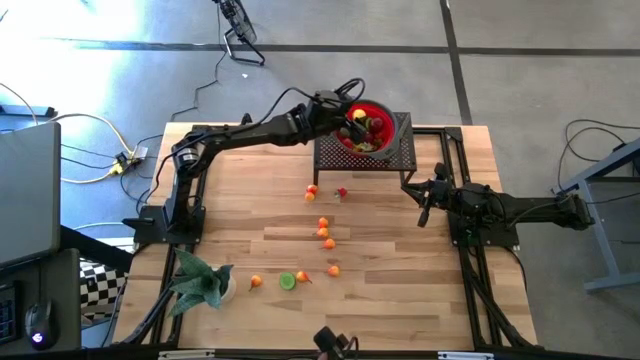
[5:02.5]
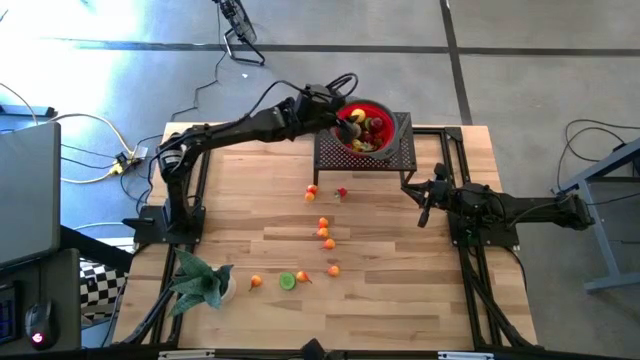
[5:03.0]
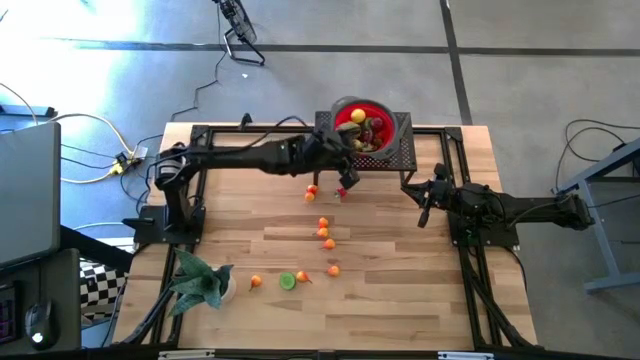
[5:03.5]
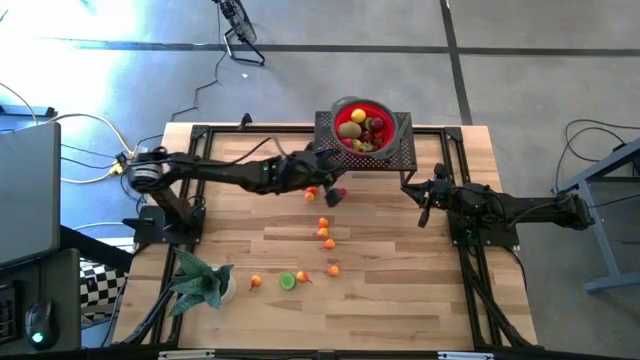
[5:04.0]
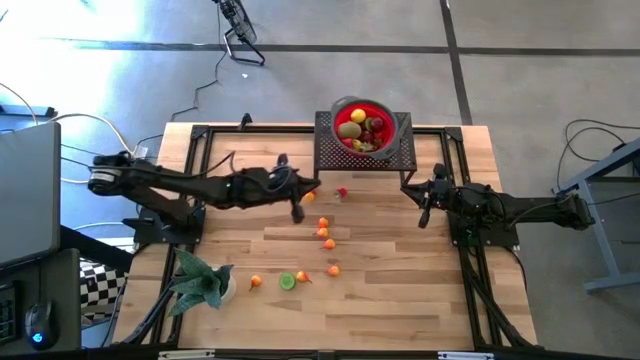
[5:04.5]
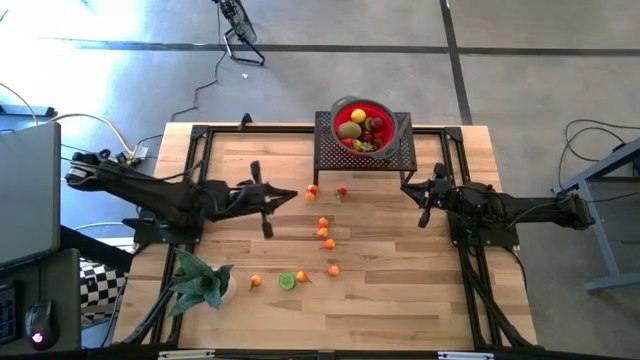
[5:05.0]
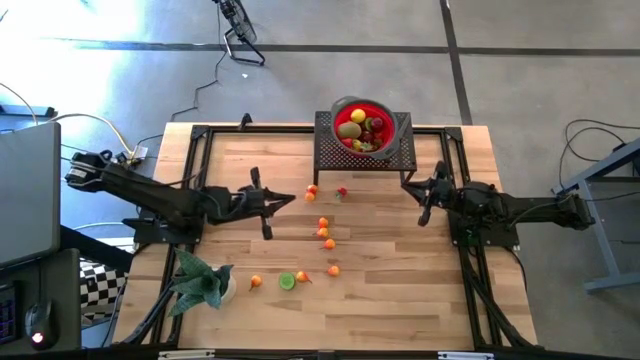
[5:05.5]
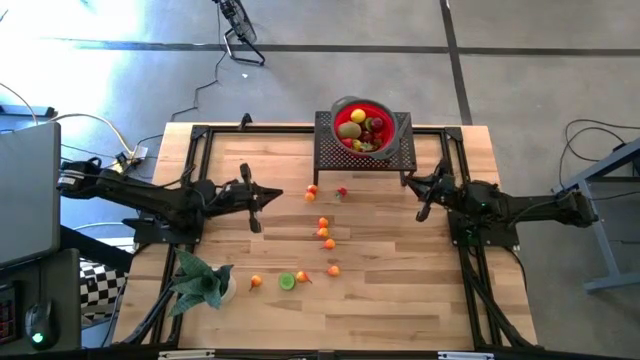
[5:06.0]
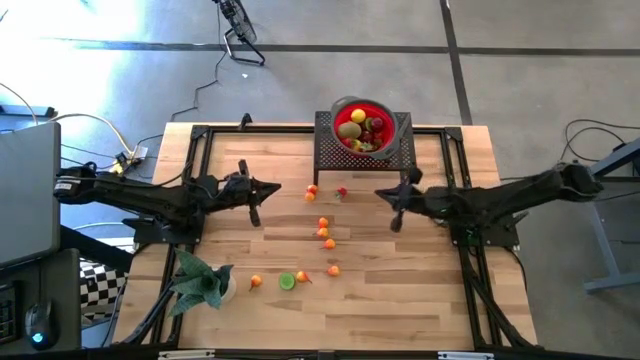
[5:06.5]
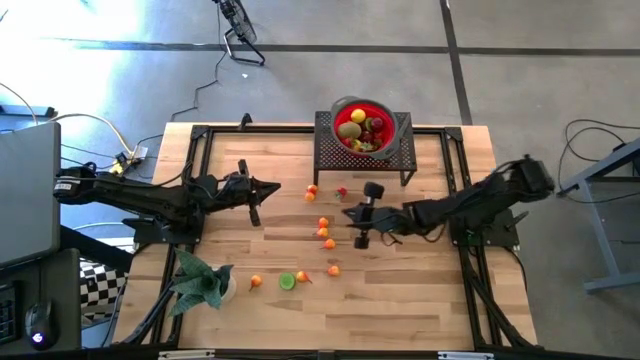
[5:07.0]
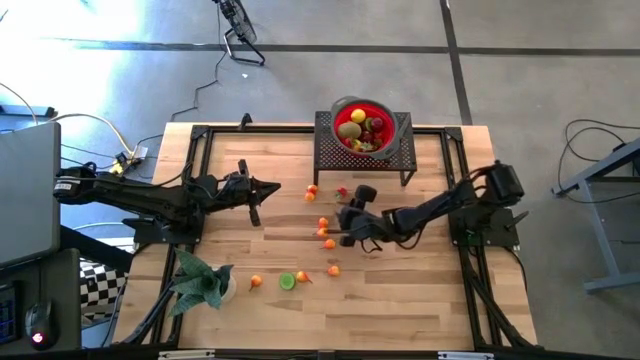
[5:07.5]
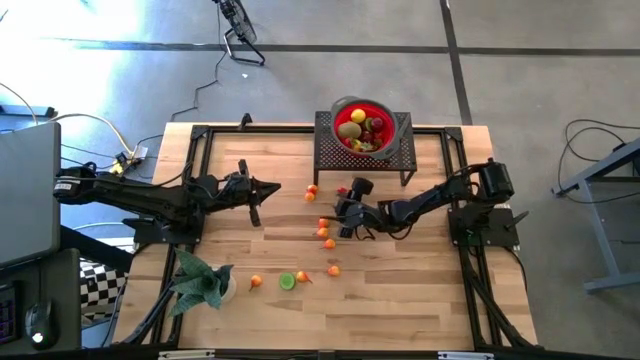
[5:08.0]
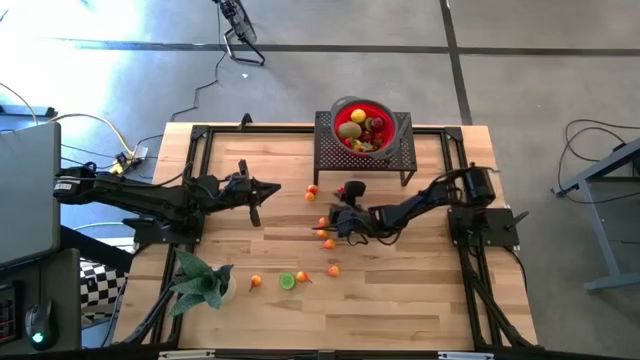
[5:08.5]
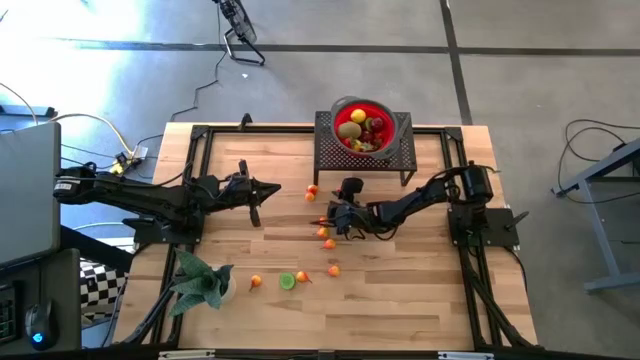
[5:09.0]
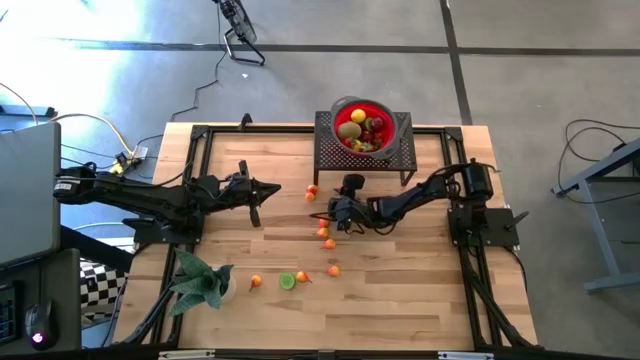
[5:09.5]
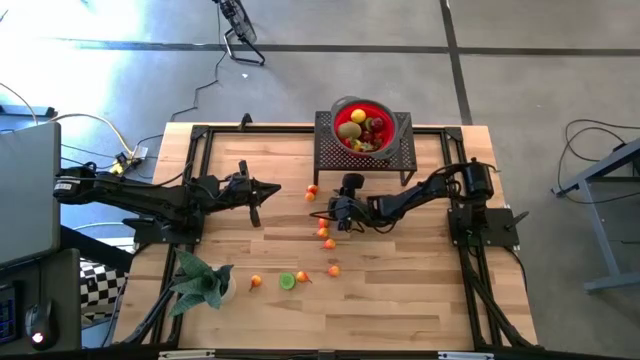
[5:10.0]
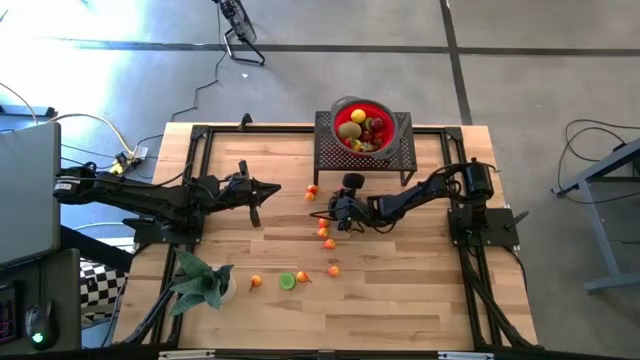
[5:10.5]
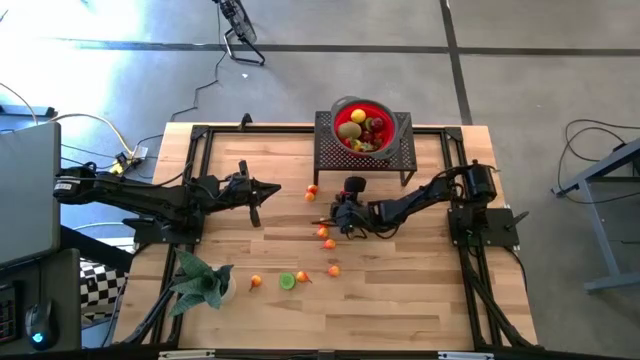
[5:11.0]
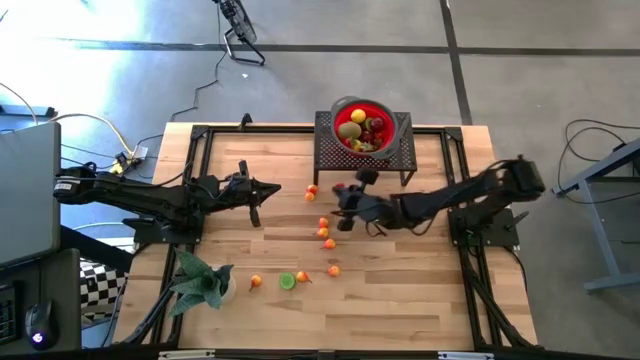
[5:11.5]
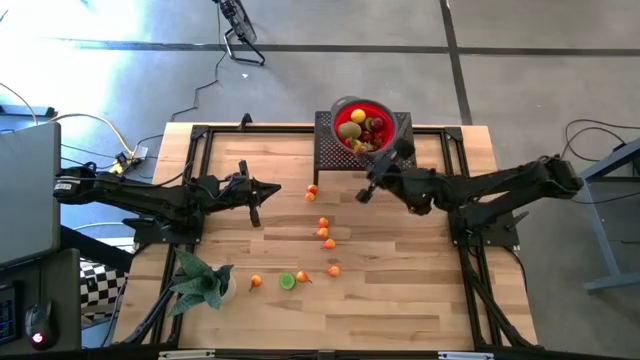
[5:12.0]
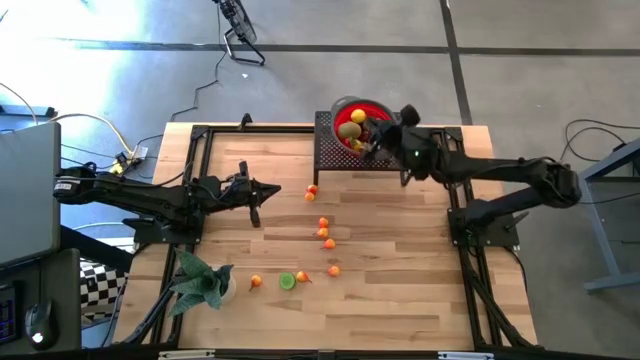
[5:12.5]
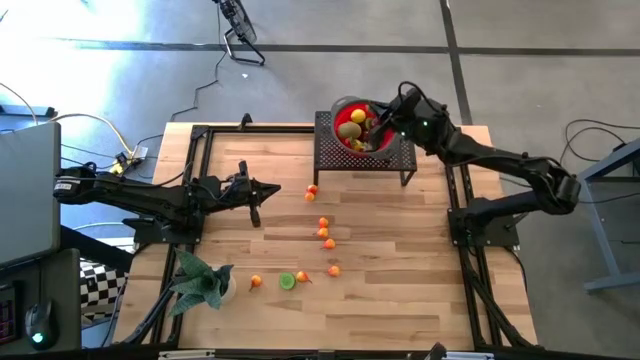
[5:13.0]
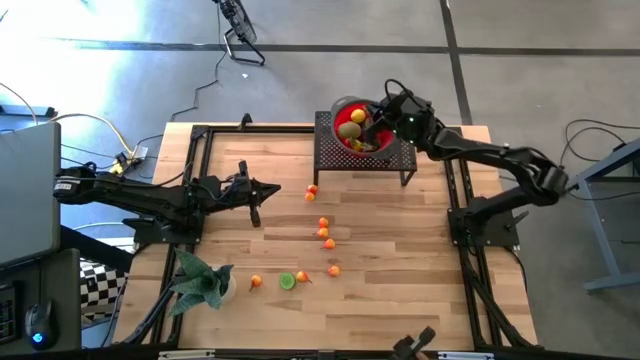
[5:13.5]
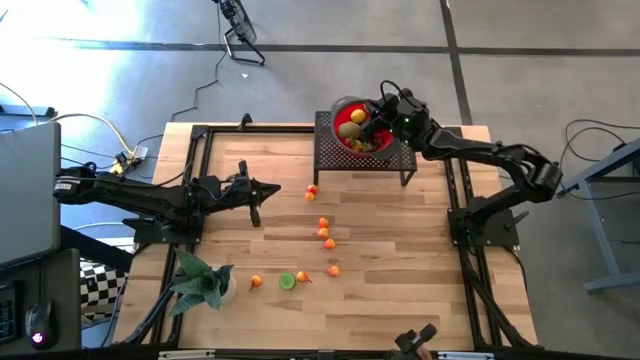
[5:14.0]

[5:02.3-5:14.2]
Task: Pick & Place Fruit
Put the strawberry into the strainer on the shelf

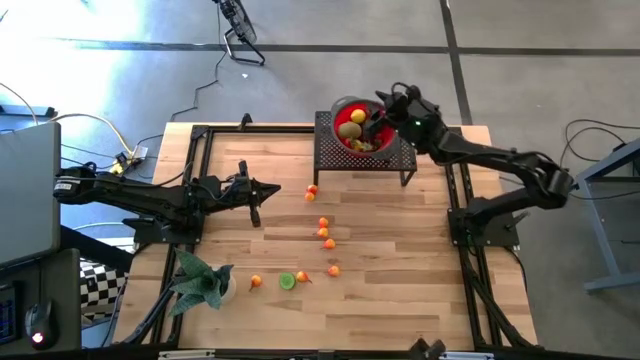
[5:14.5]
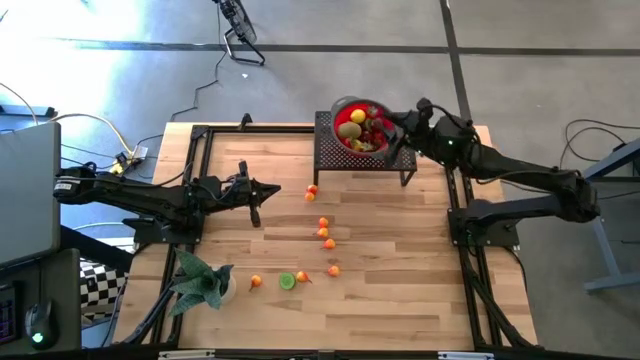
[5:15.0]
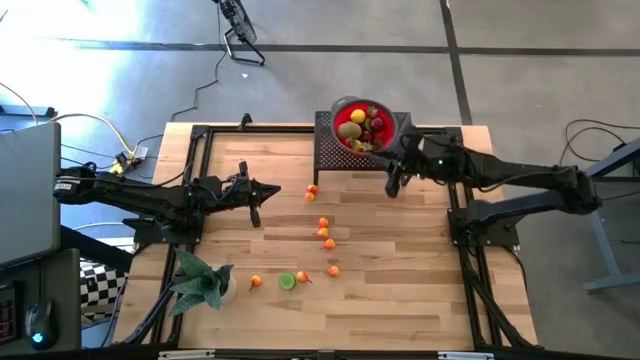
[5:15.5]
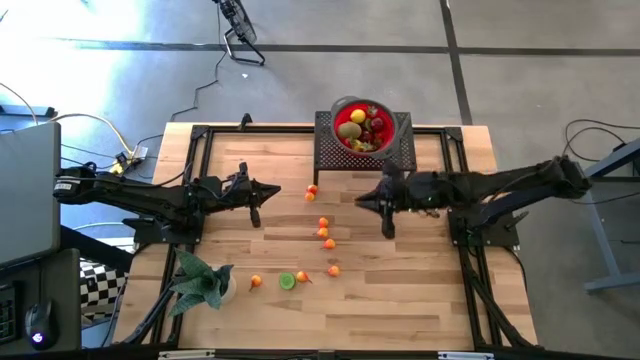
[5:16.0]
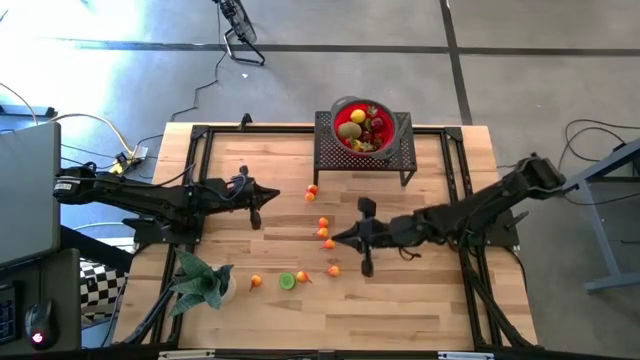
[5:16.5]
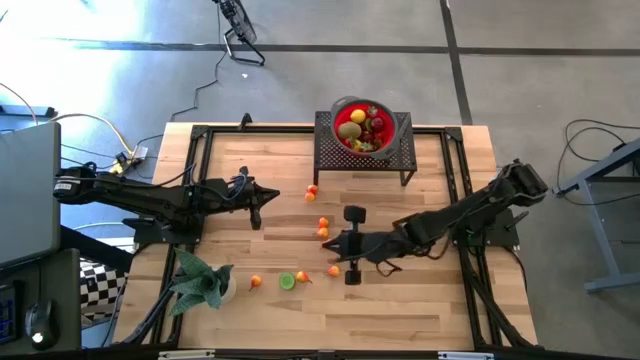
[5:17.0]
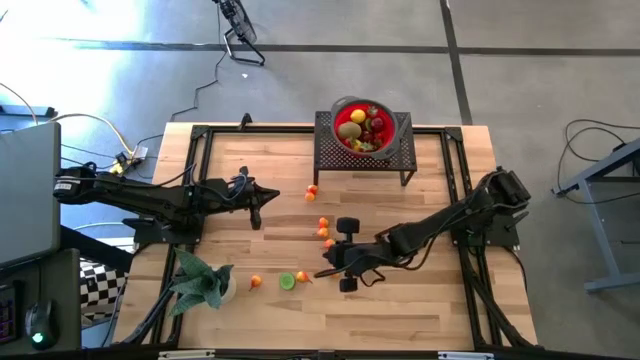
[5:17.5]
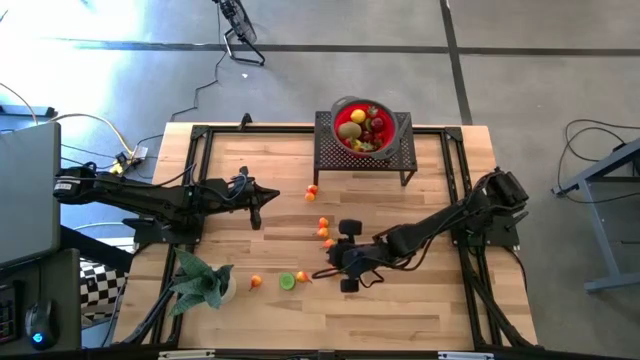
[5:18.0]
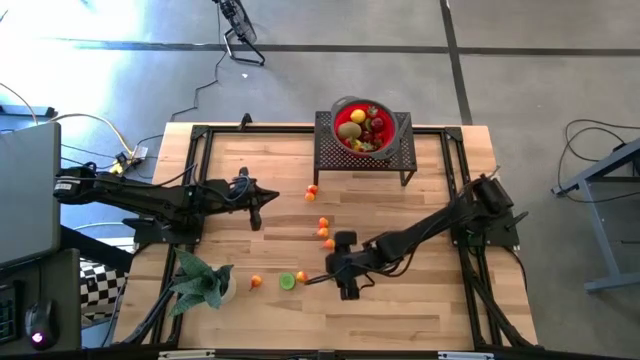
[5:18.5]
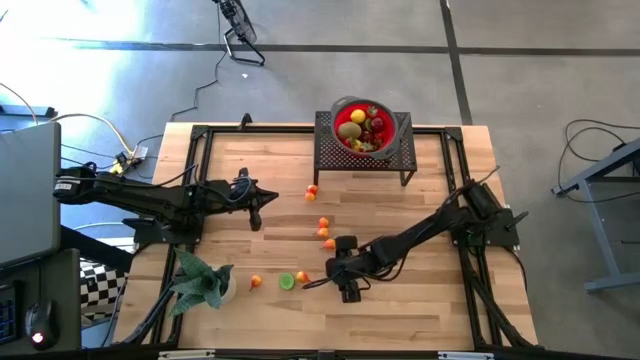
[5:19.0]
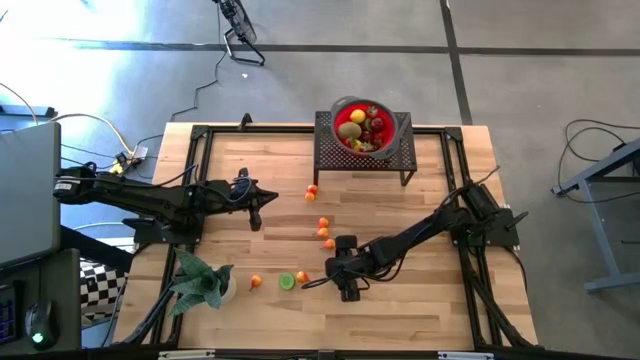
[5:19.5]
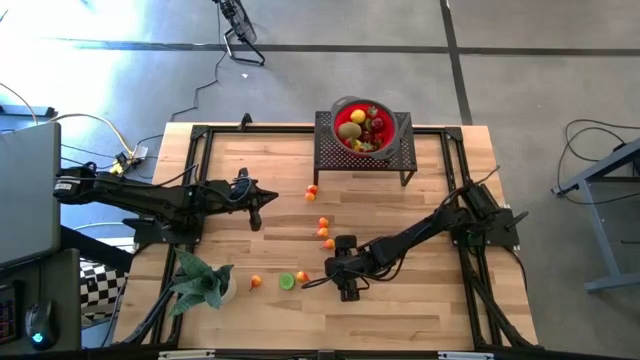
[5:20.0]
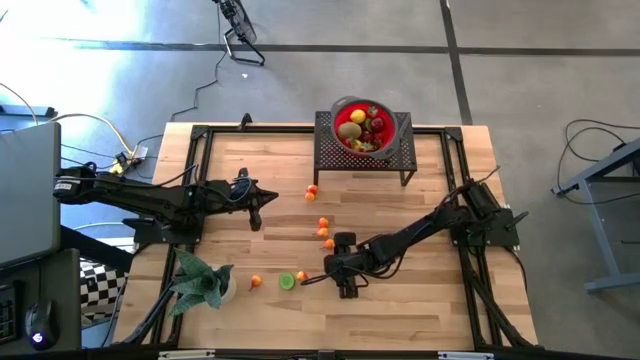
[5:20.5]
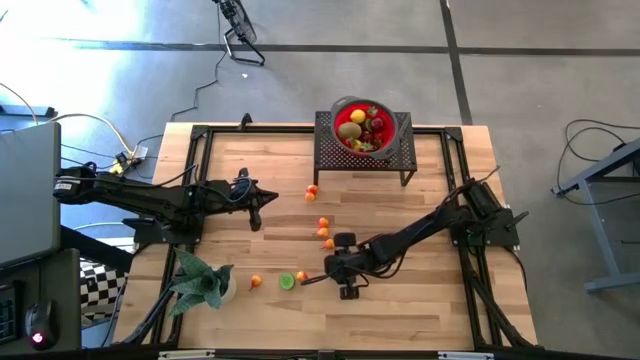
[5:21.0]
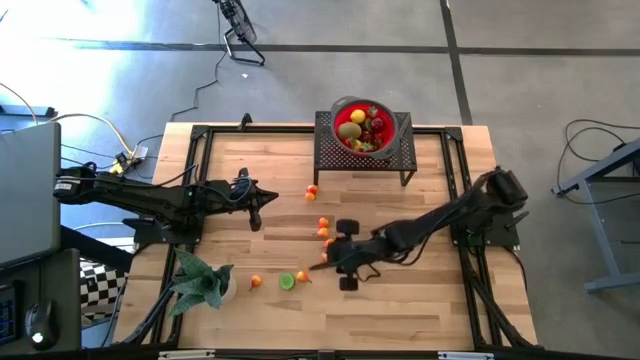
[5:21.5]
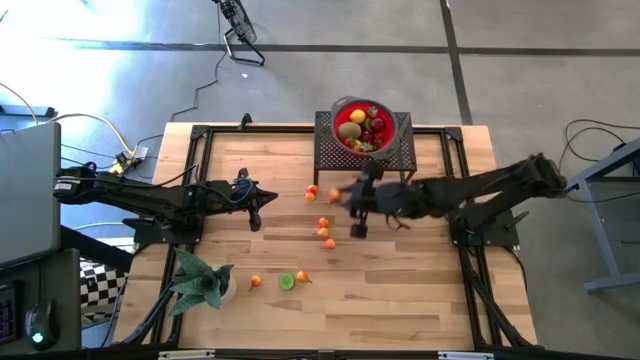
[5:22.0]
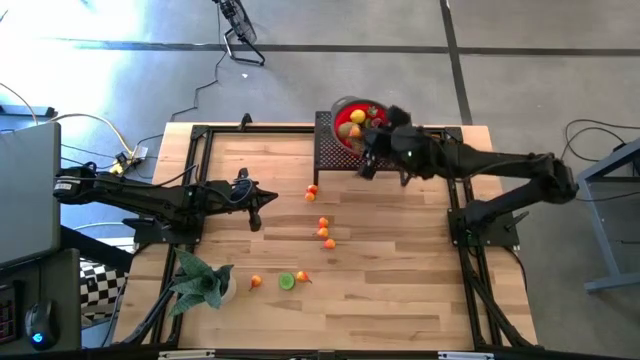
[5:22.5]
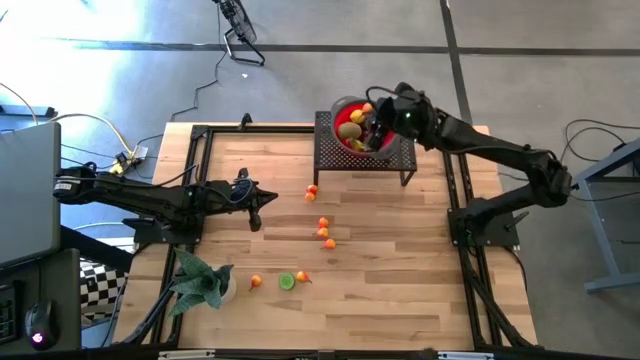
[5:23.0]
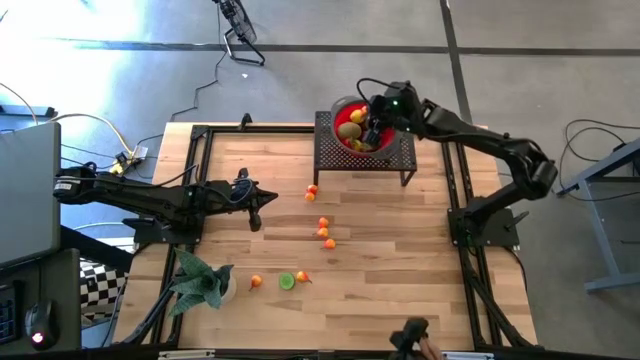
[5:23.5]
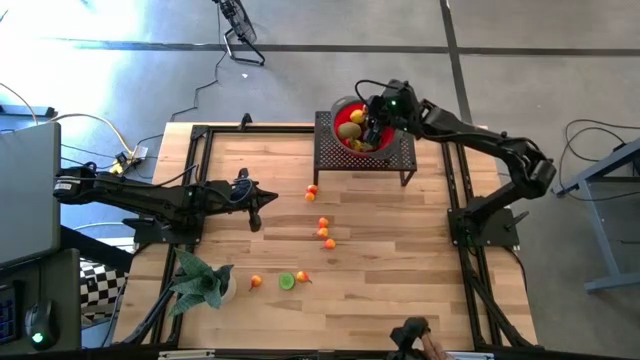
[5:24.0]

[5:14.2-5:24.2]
Put the pear into the strainer on the shelf
